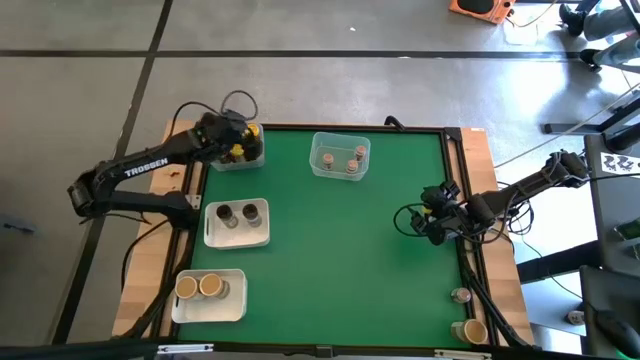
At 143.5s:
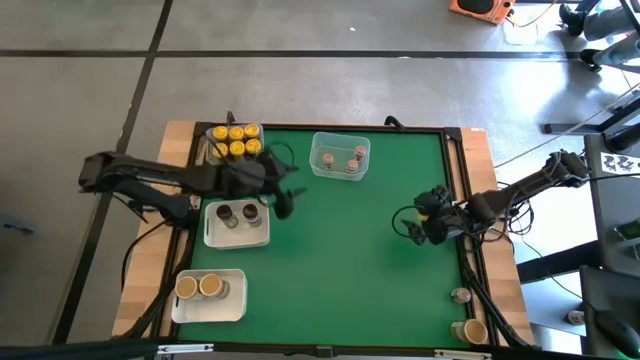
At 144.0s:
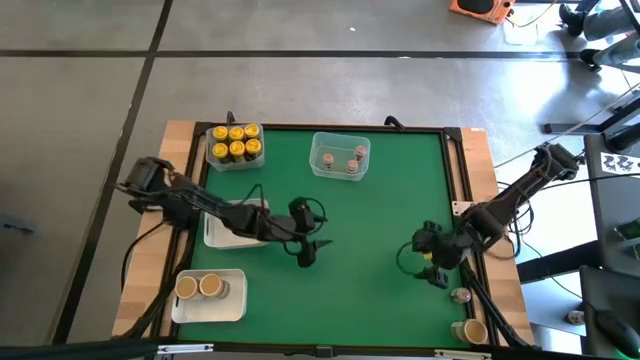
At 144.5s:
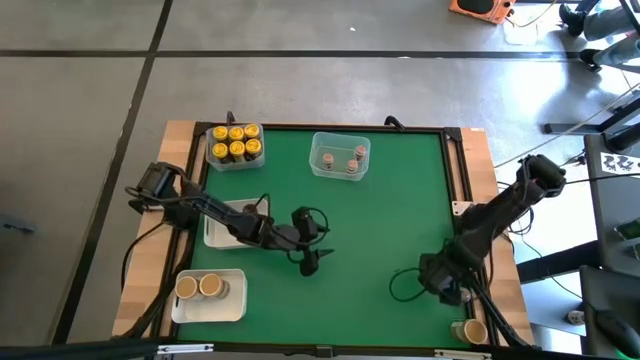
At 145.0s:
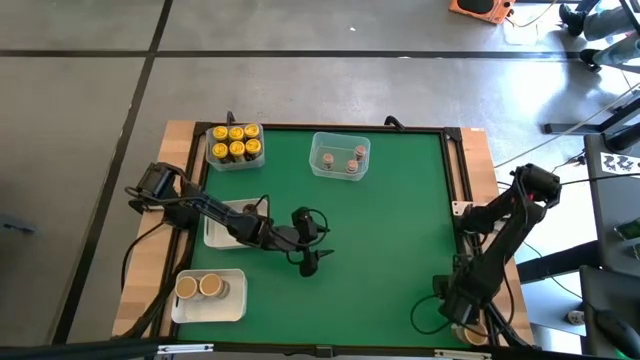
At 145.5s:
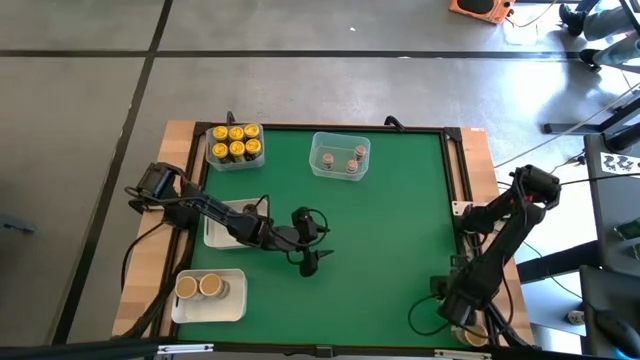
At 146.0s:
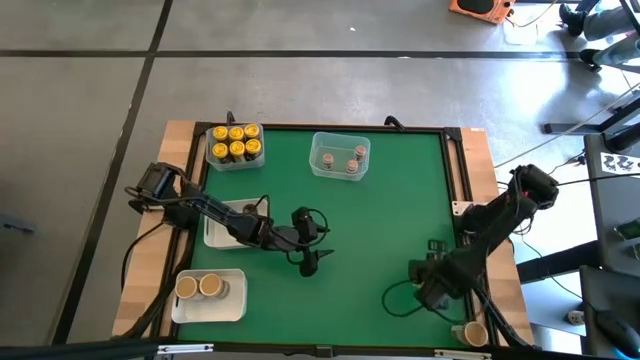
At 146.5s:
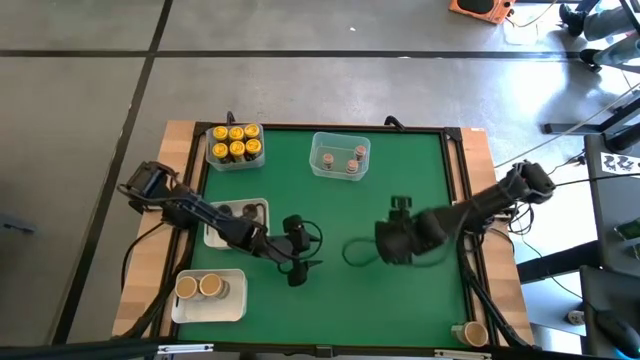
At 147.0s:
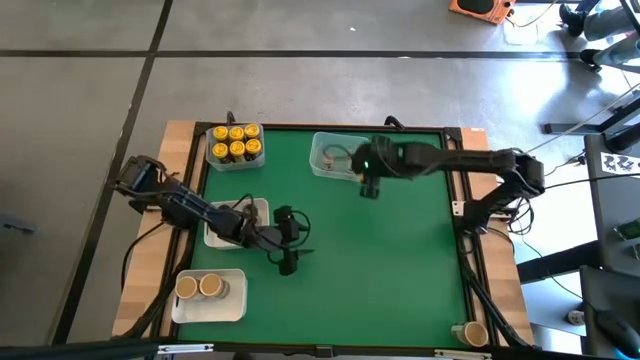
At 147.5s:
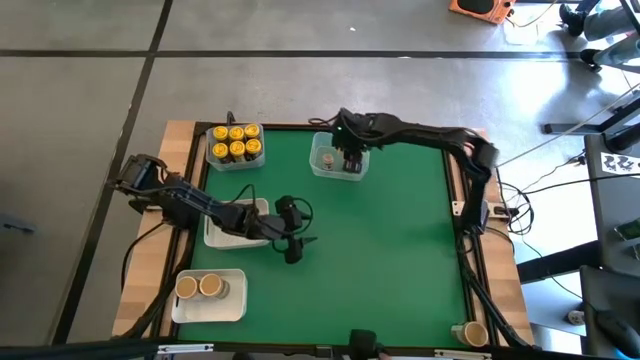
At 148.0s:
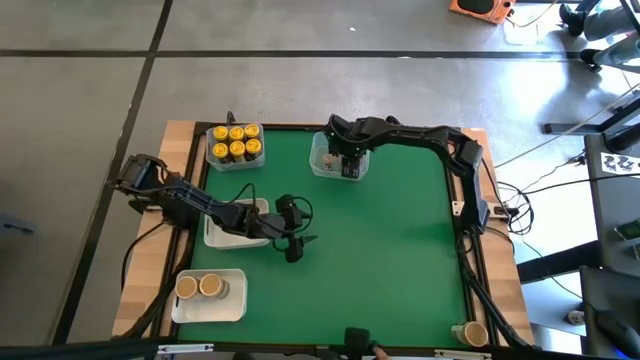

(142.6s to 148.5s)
Task: Sort spices by type
Put the brown seasoning bottle into the right transparent bin

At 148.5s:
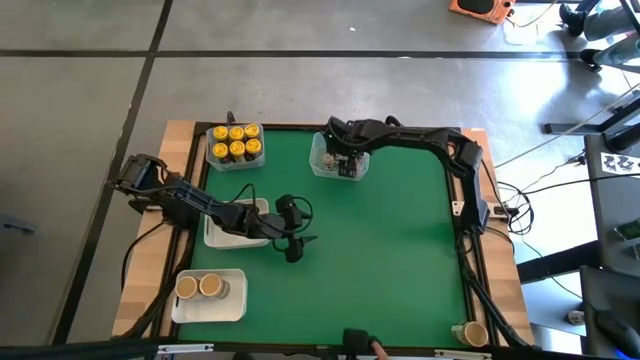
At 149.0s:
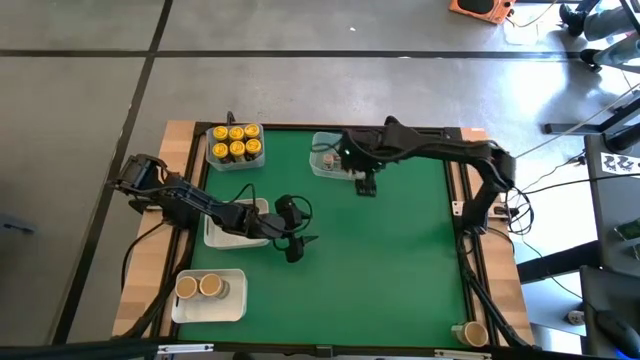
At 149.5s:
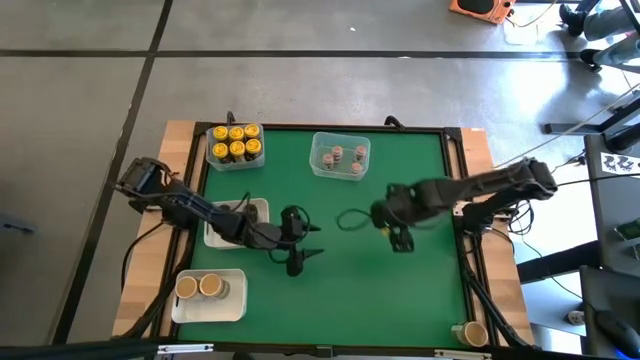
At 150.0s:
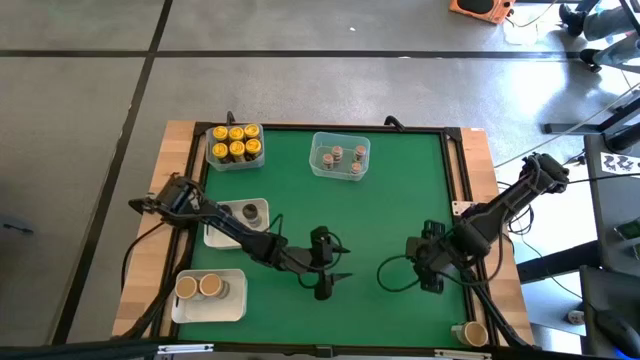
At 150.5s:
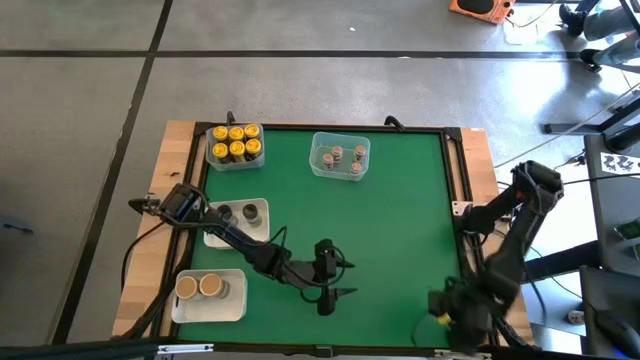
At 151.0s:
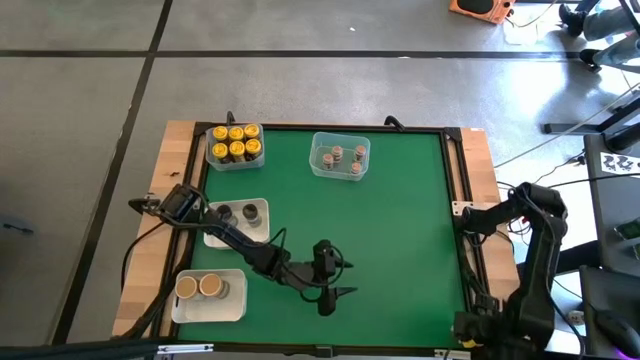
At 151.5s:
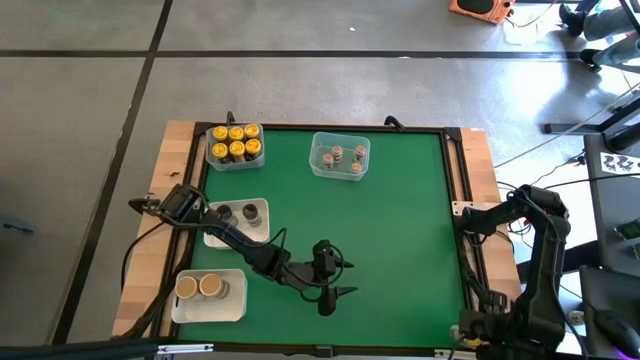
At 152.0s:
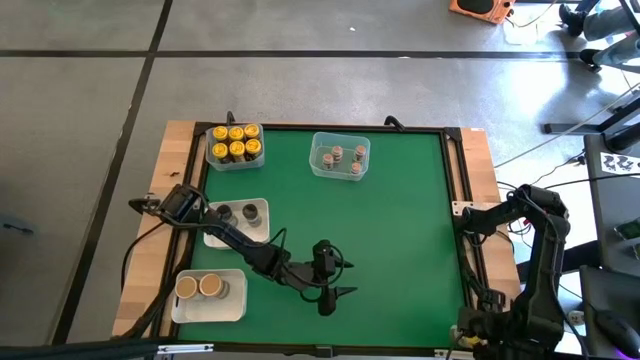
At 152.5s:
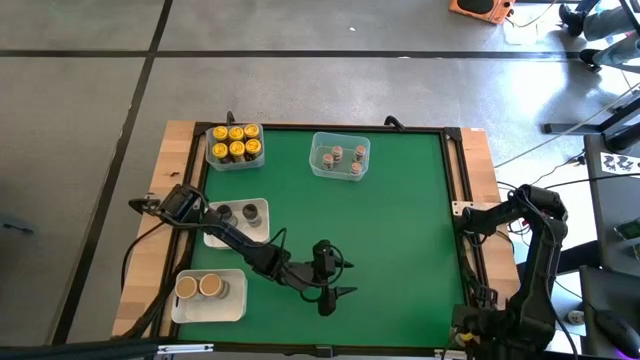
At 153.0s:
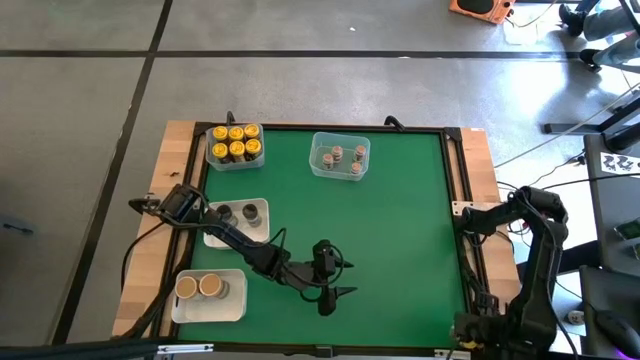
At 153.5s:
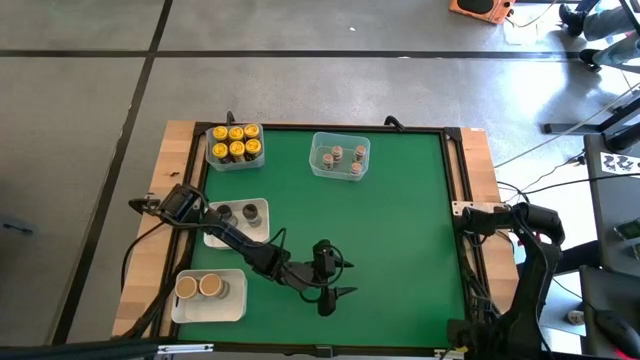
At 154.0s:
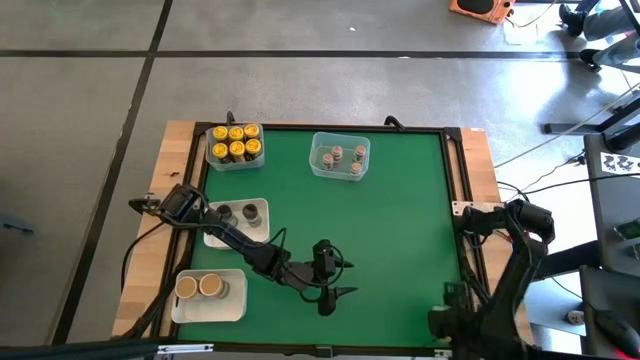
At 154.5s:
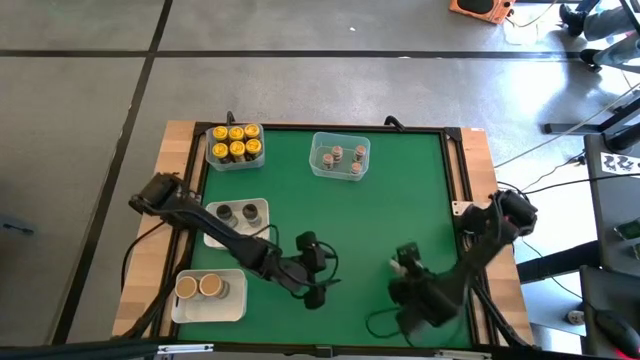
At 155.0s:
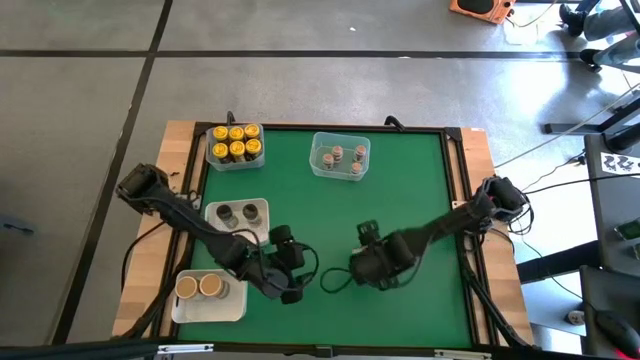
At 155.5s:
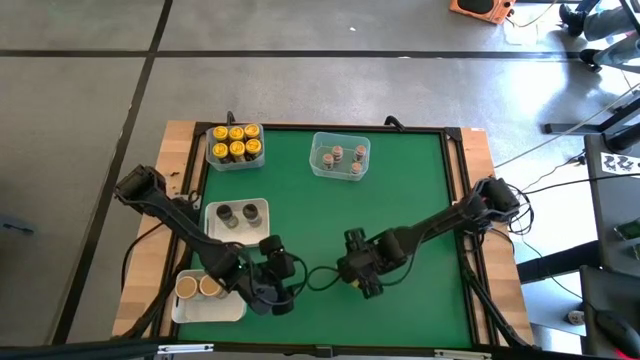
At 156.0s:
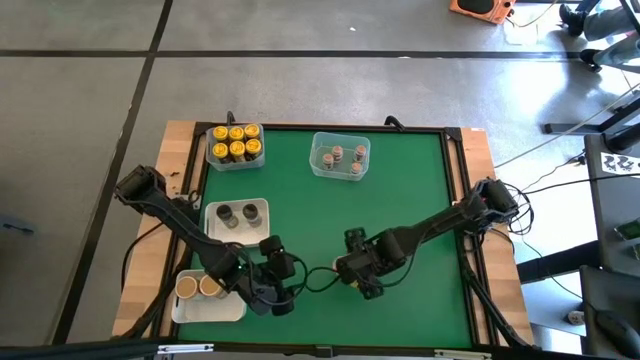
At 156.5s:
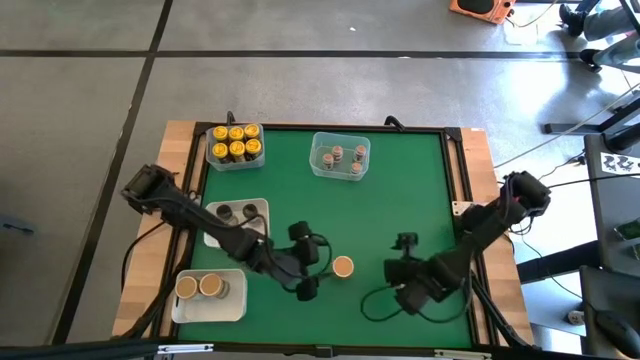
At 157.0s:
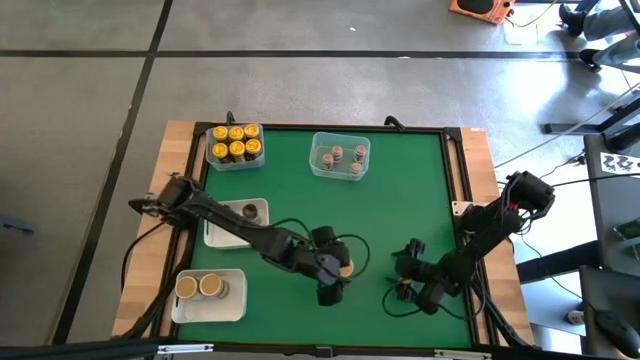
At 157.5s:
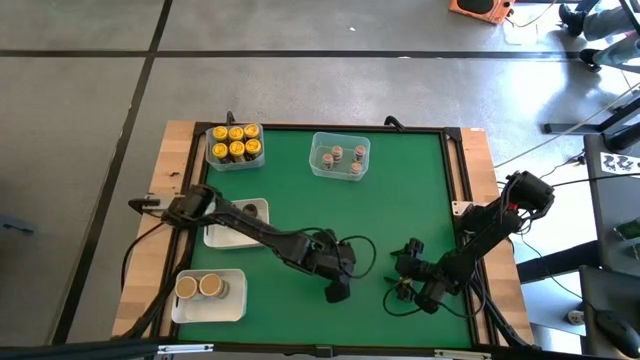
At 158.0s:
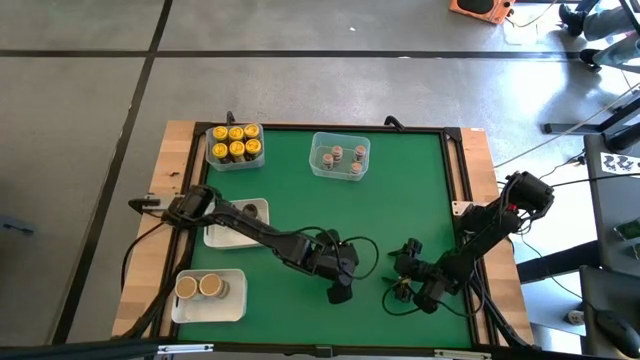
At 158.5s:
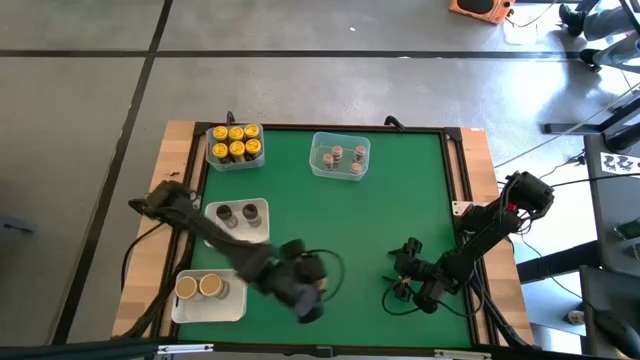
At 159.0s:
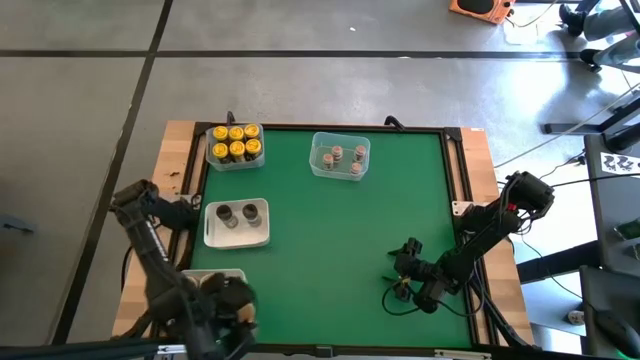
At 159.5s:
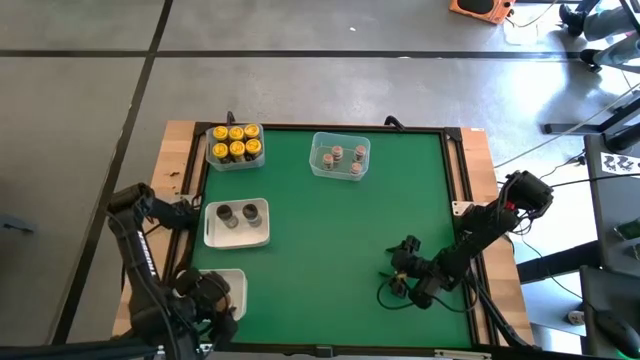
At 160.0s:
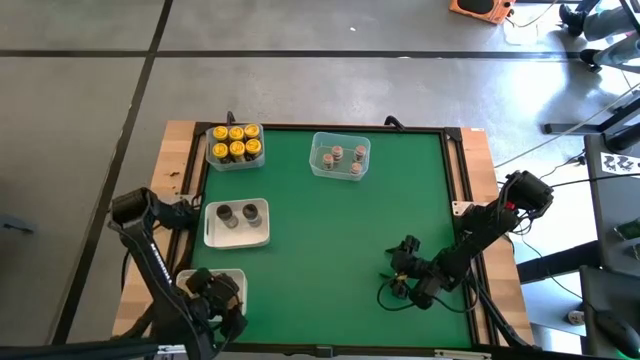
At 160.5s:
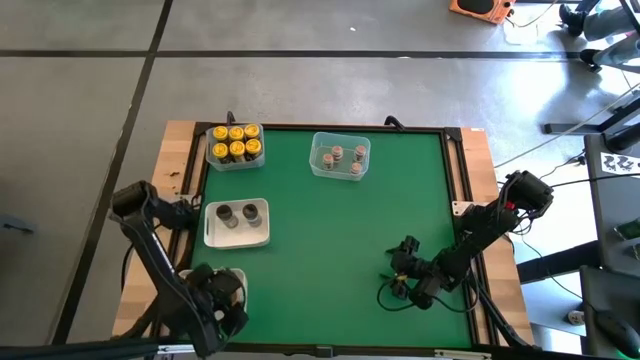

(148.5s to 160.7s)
Put the gold seasoning bottle into the bottom white bin

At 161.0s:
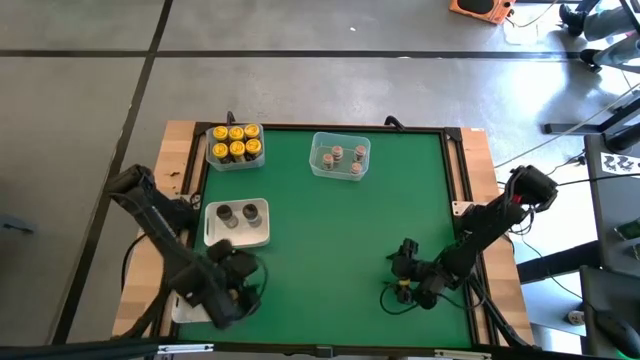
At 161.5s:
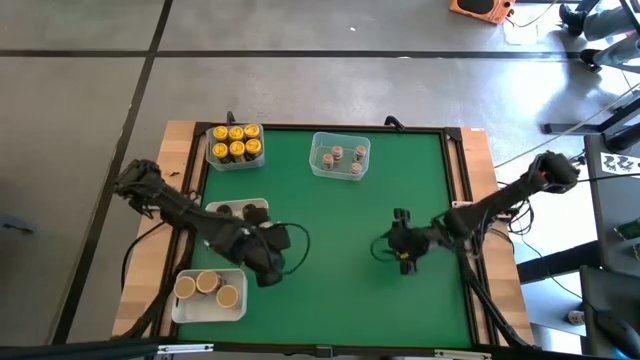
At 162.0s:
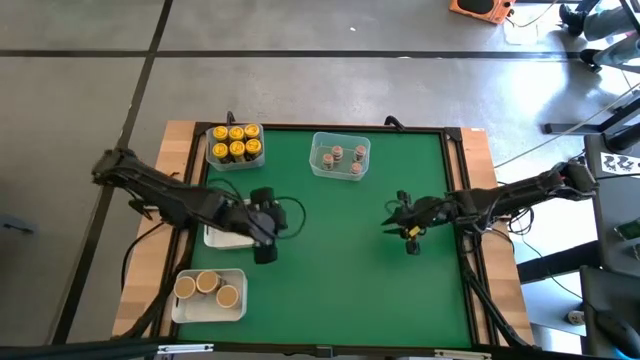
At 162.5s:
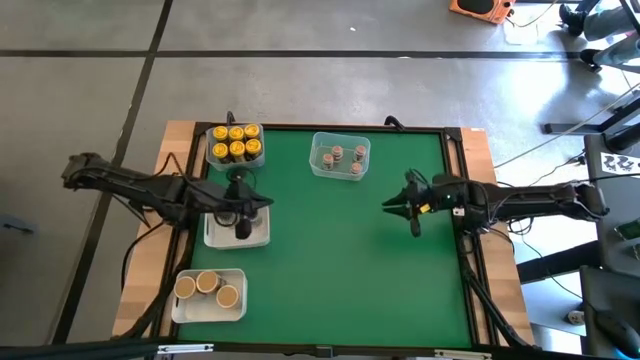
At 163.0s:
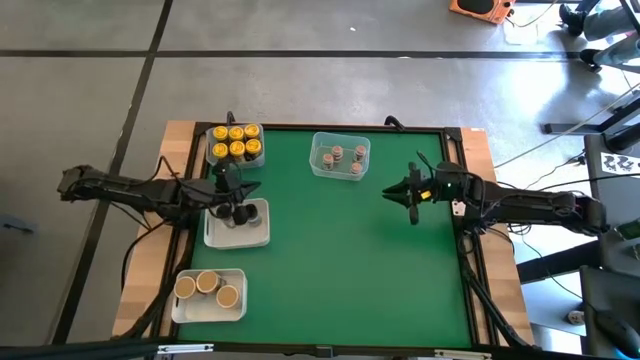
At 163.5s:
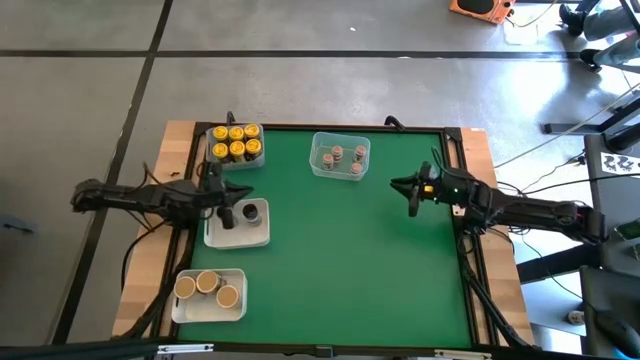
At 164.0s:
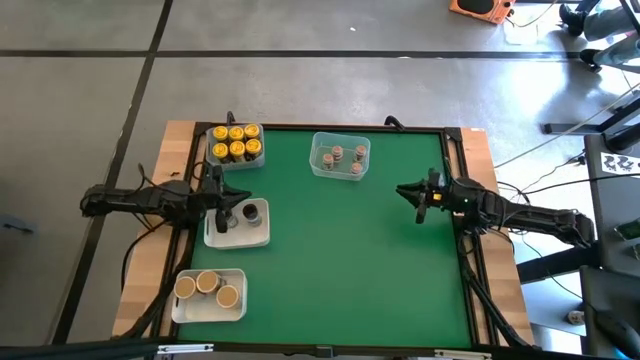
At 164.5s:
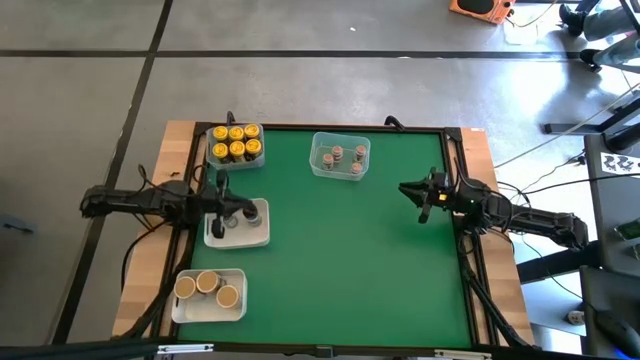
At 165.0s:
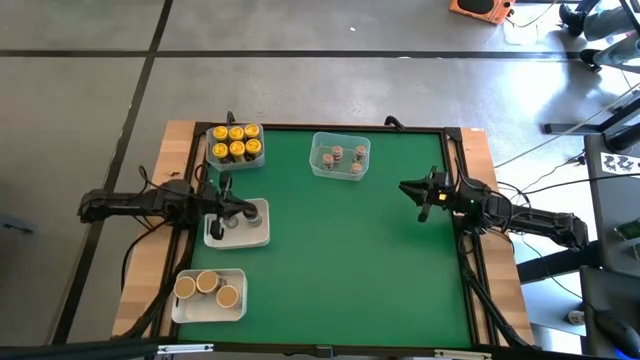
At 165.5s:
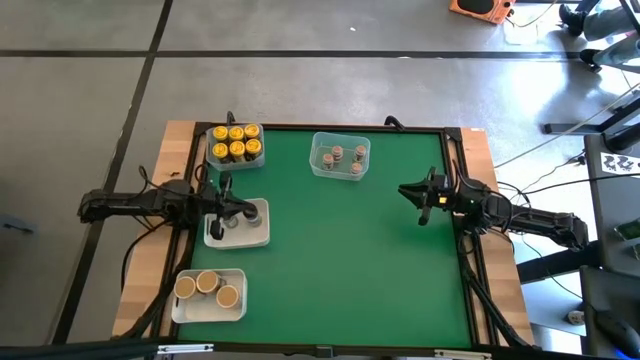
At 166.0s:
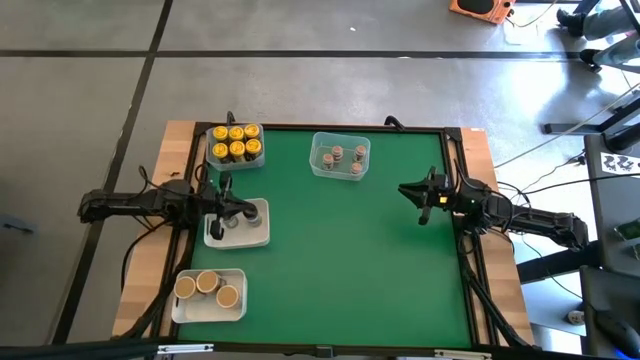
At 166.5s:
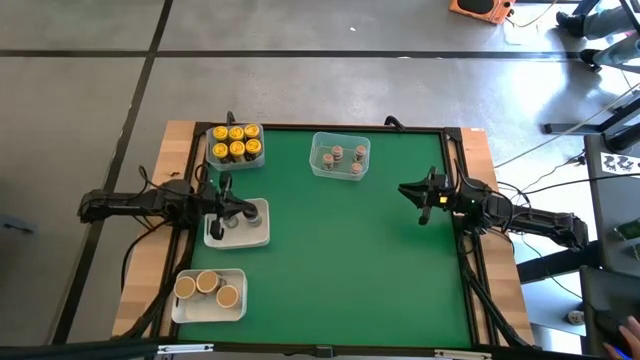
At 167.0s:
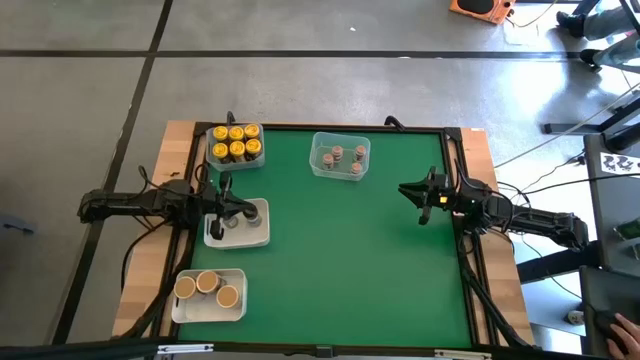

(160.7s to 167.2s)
Return to Home Position
